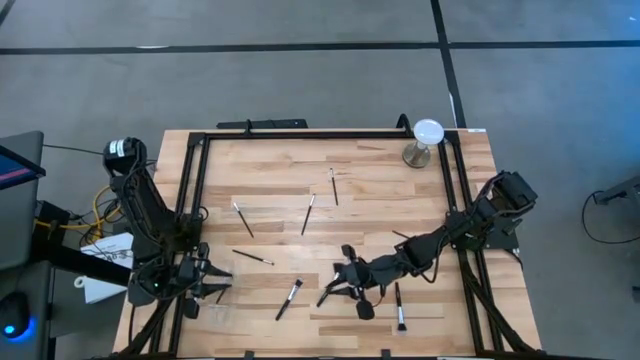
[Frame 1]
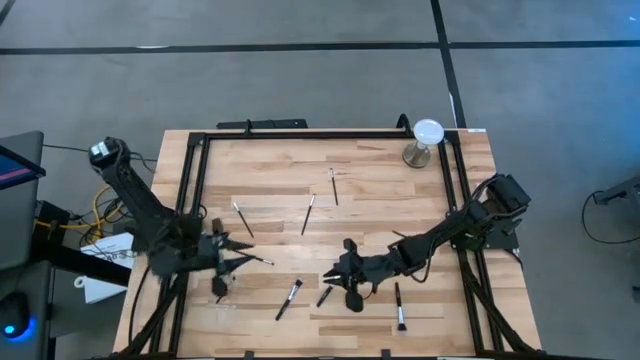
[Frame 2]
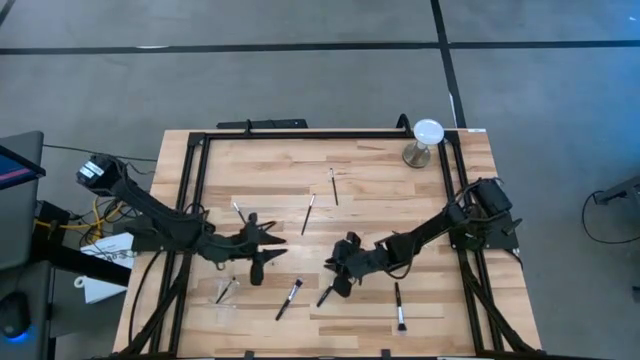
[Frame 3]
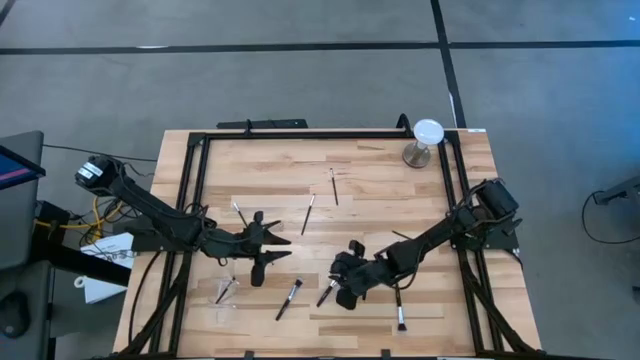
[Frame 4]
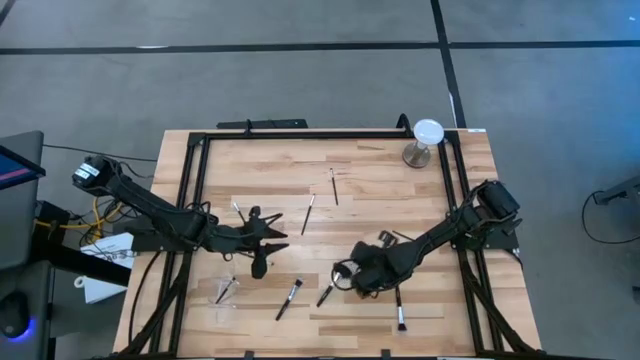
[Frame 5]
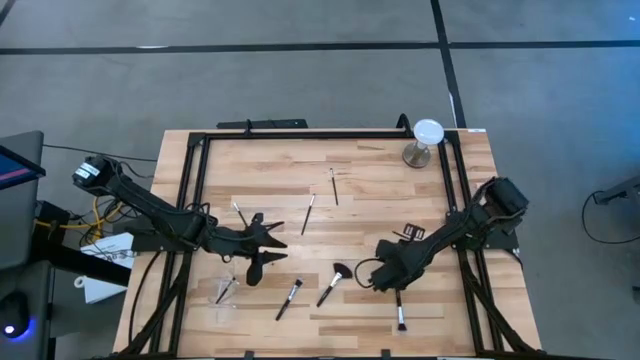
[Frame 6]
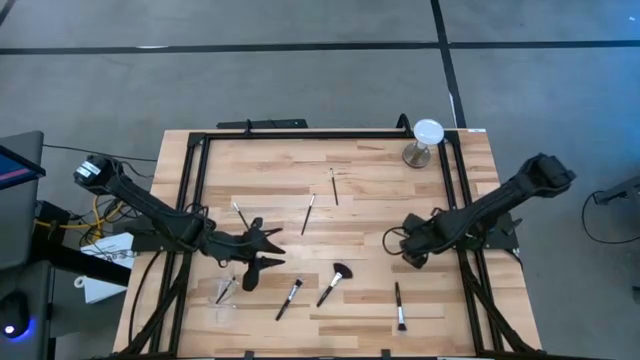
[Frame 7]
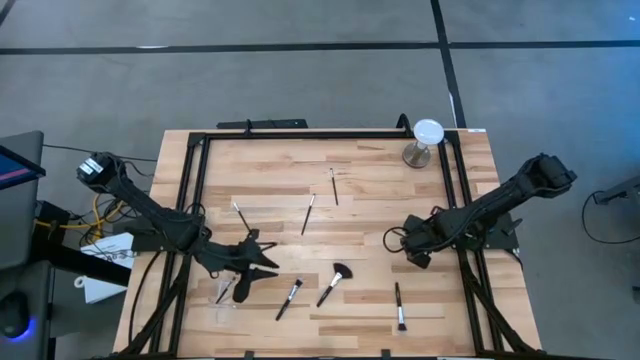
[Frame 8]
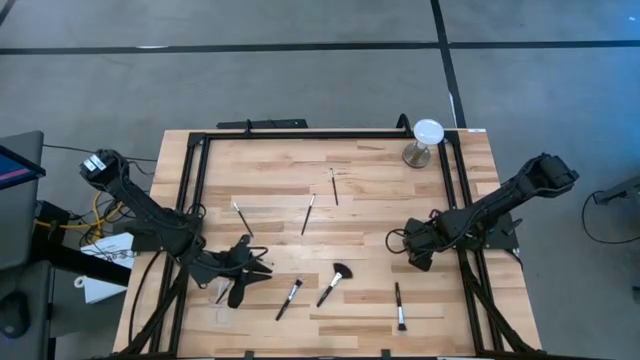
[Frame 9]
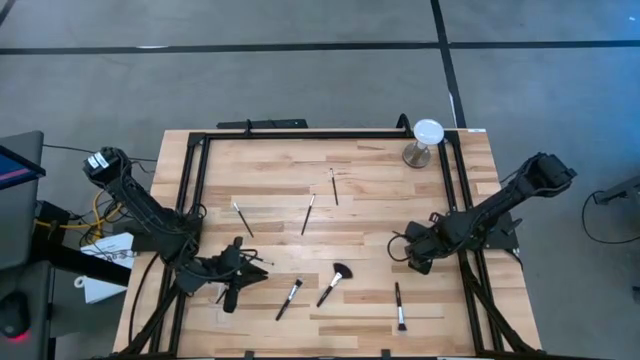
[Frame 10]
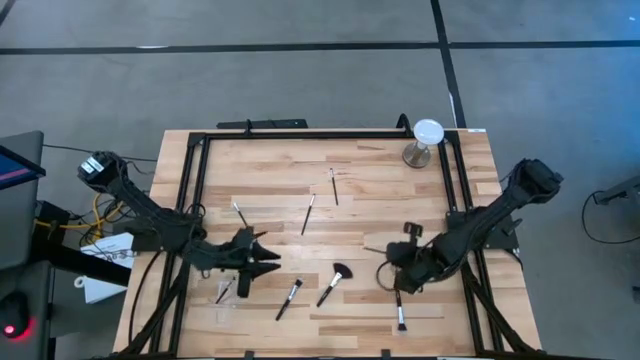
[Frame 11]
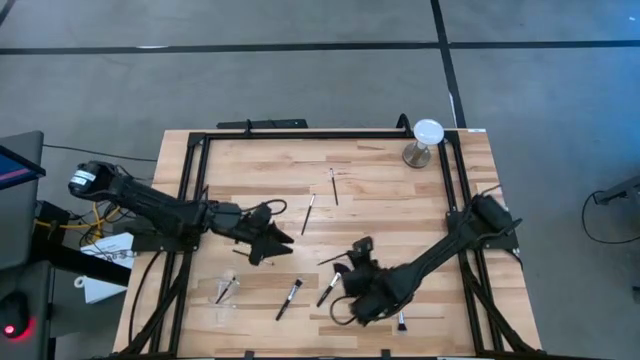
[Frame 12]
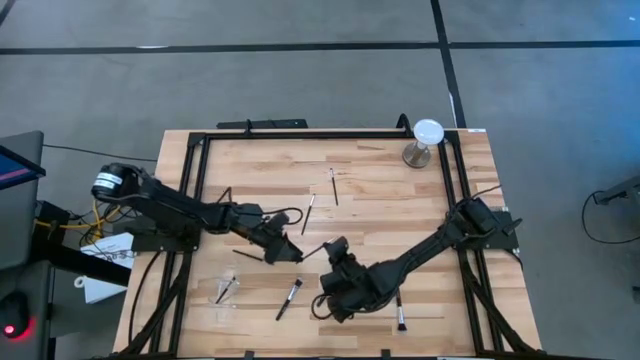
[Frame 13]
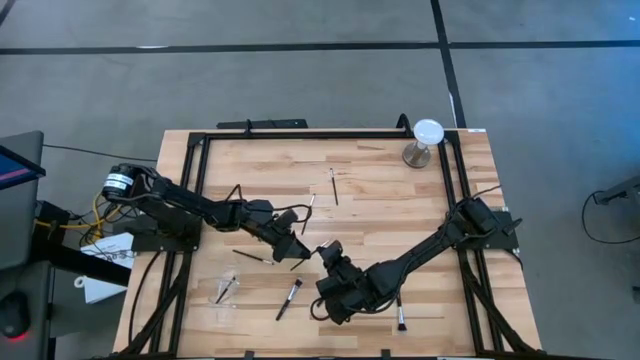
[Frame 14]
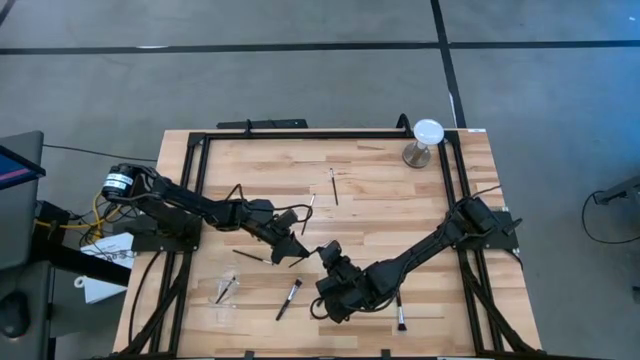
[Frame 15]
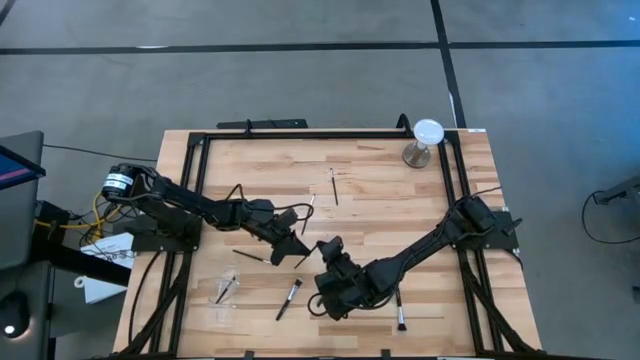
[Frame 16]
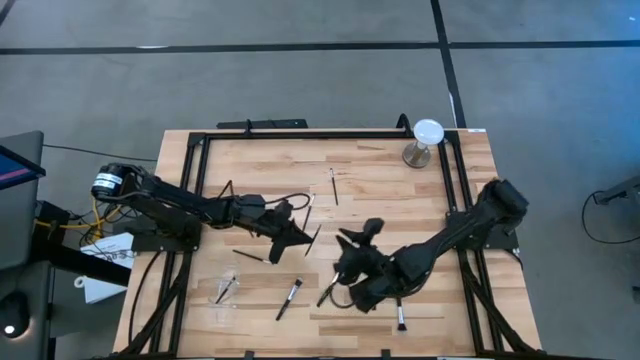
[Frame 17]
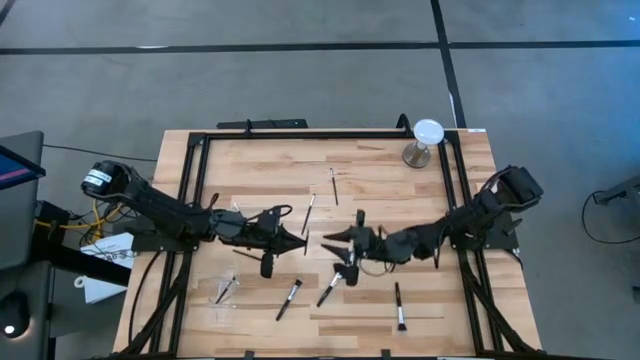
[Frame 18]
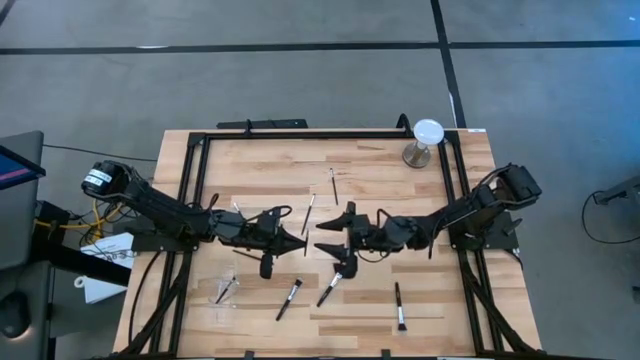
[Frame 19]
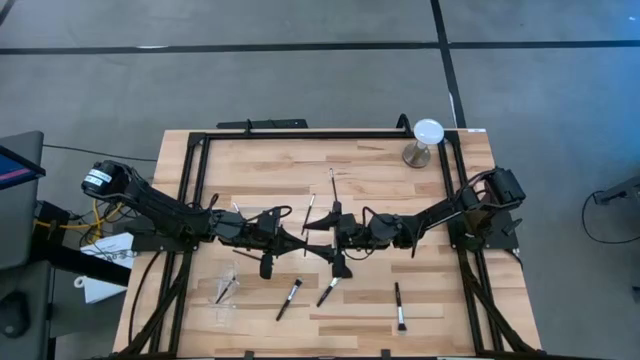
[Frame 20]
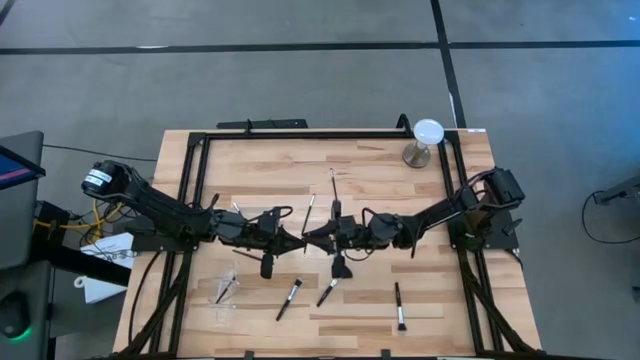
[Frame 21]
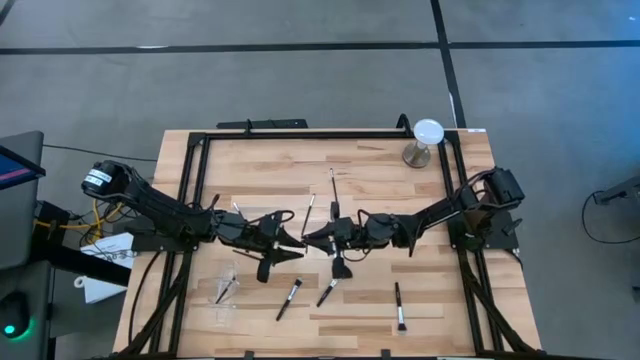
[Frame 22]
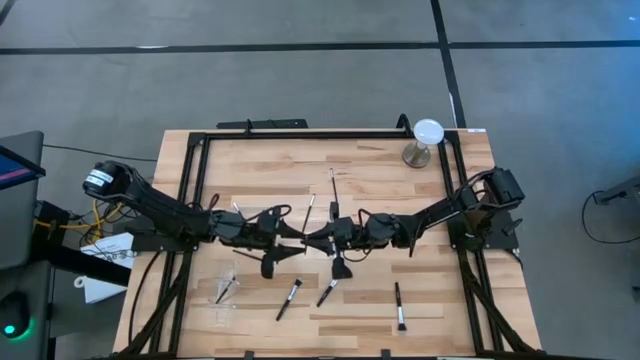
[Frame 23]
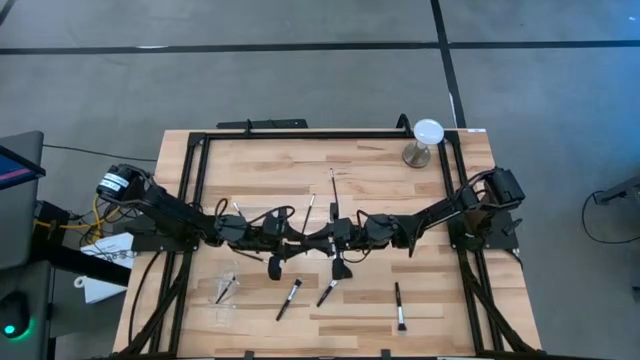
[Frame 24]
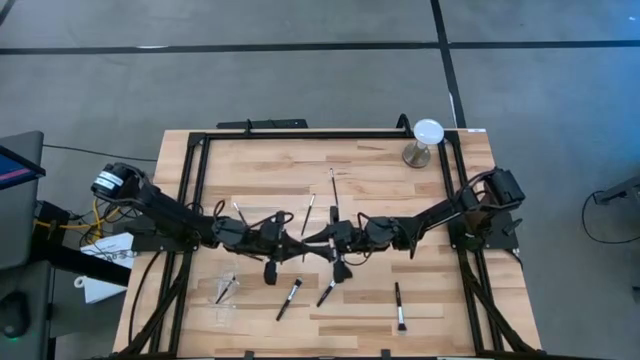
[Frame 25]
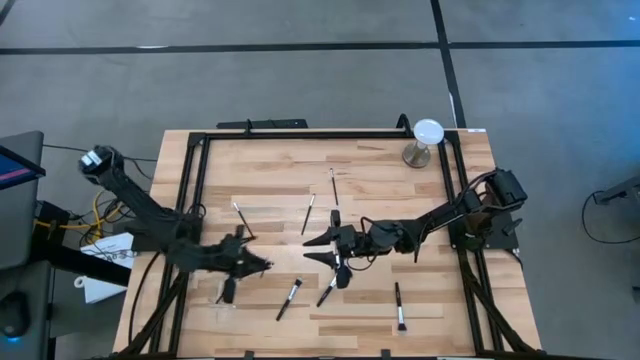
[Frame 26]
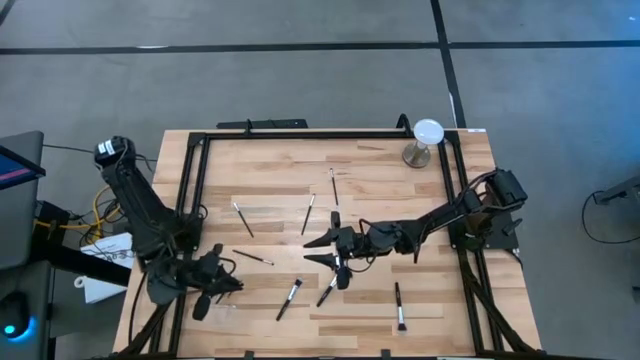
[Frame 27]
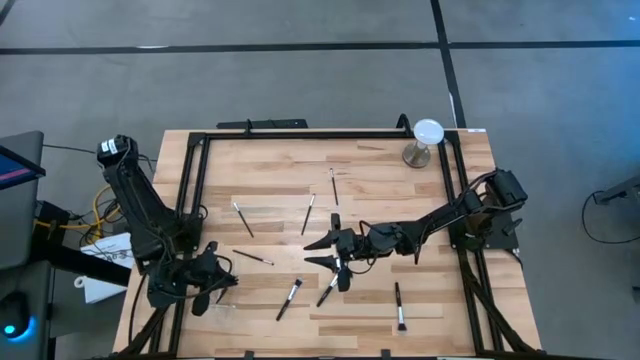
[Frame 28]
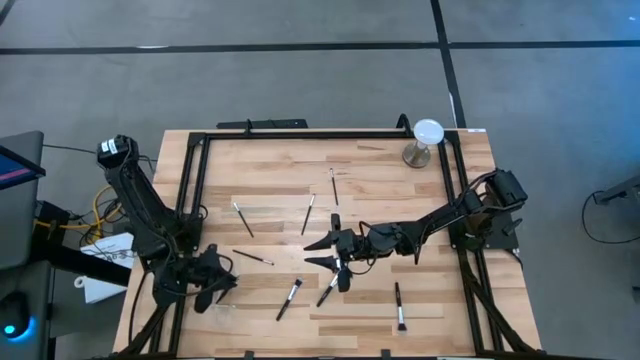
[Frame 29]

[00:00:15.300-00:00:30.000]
Task: Put items in baskets/containers
Put the liner brush into the transparent organizer

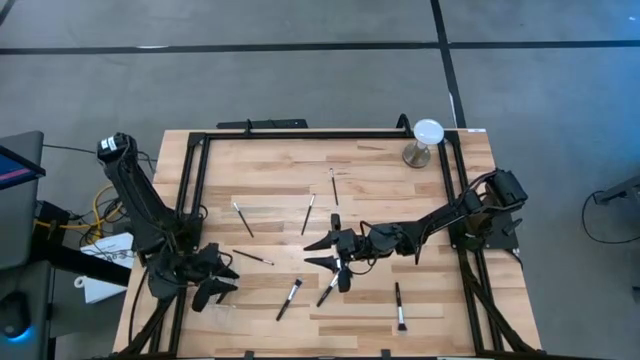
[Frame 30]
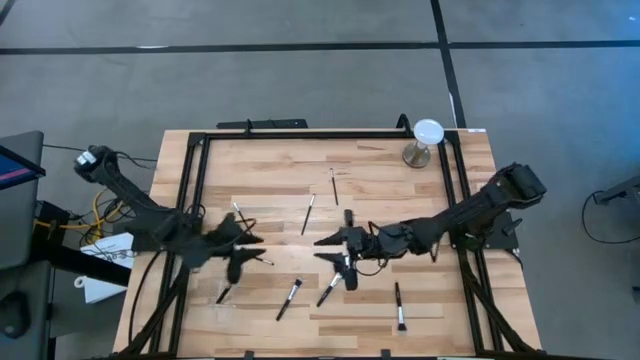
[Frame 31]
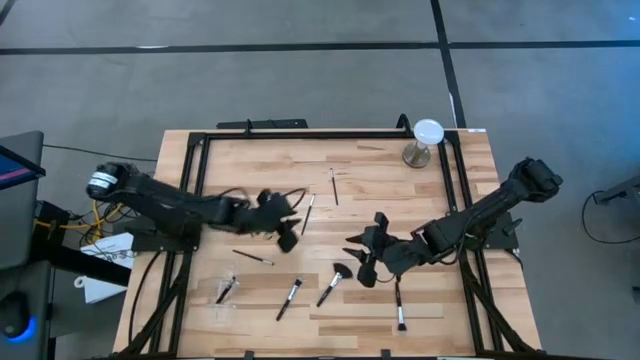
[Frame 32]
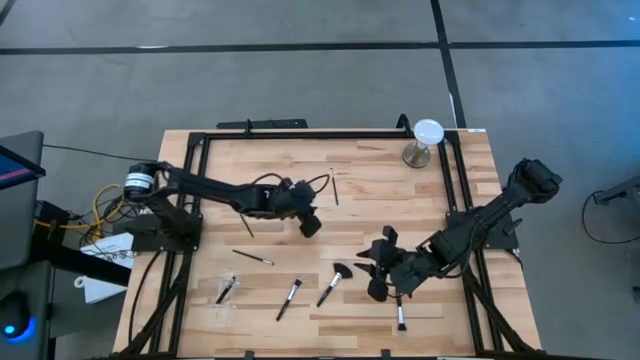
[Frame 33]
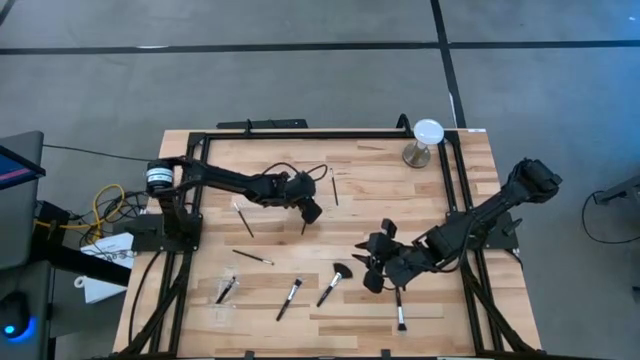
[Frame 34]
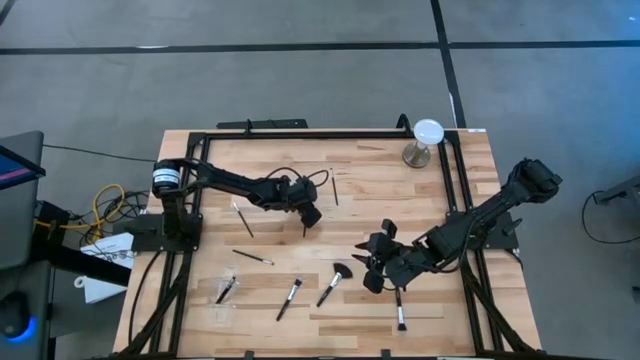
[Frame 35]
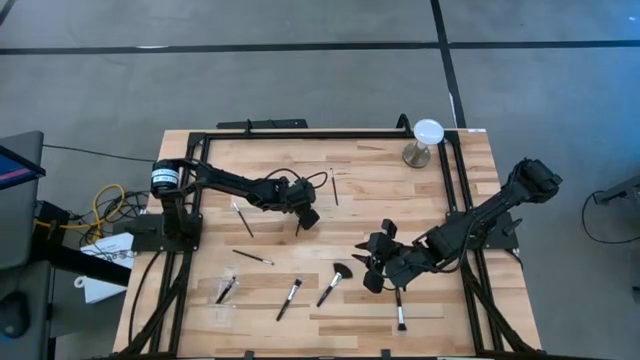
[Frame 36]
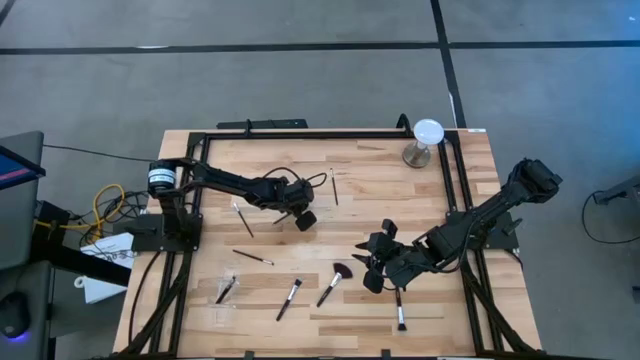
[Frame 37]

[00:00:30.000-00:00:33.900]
Put the eyeshadow brush into the transparent organizer

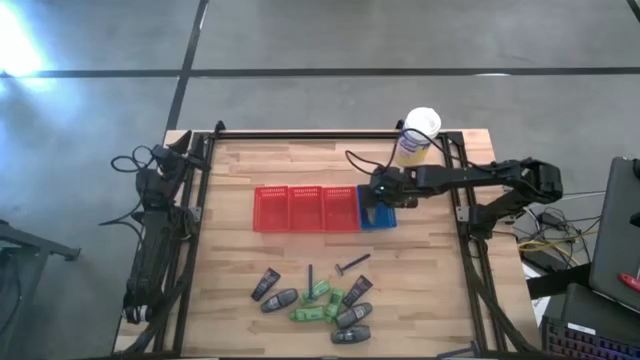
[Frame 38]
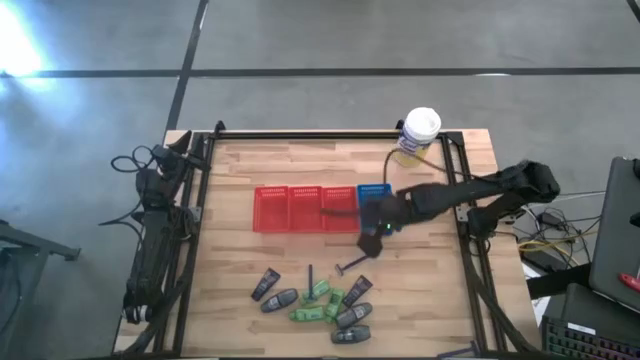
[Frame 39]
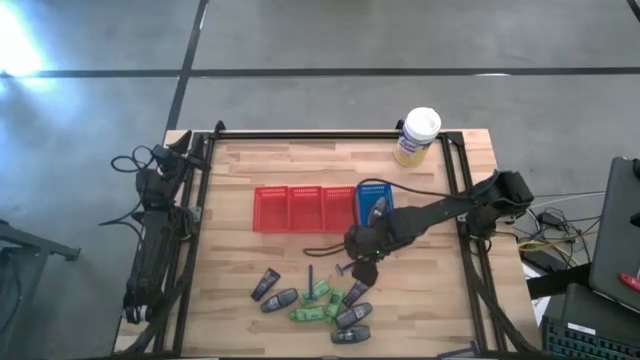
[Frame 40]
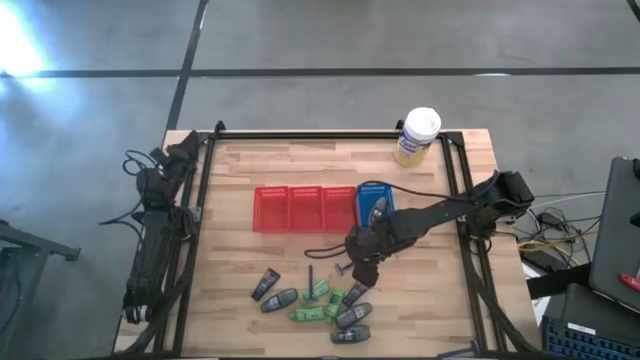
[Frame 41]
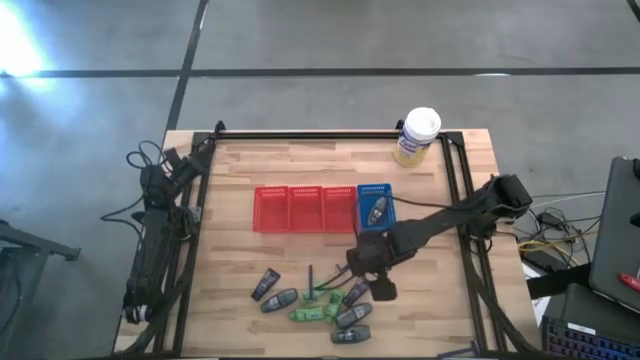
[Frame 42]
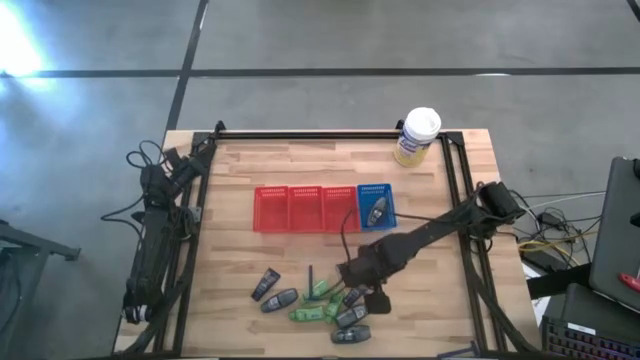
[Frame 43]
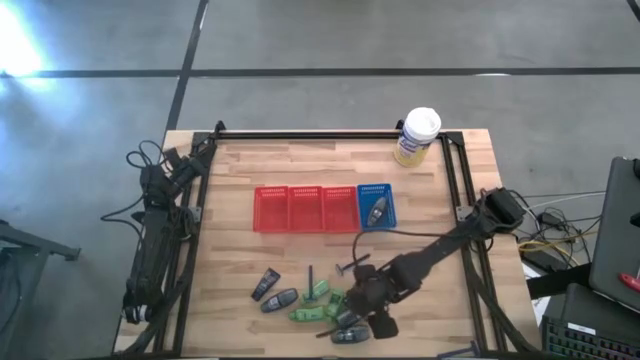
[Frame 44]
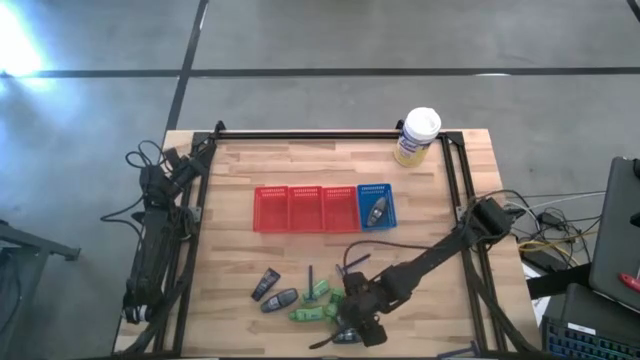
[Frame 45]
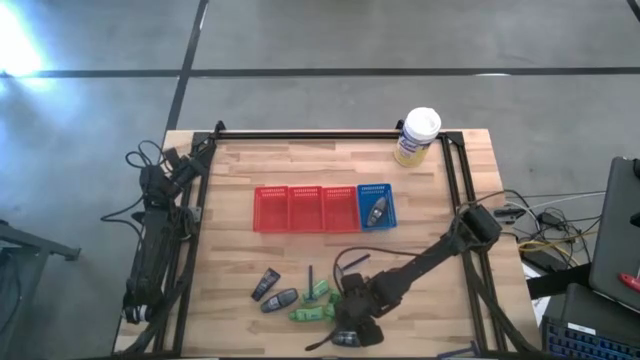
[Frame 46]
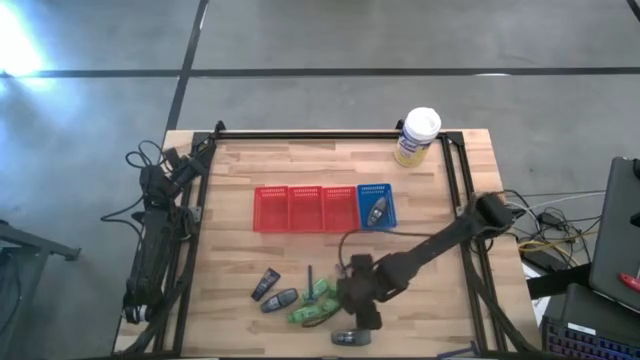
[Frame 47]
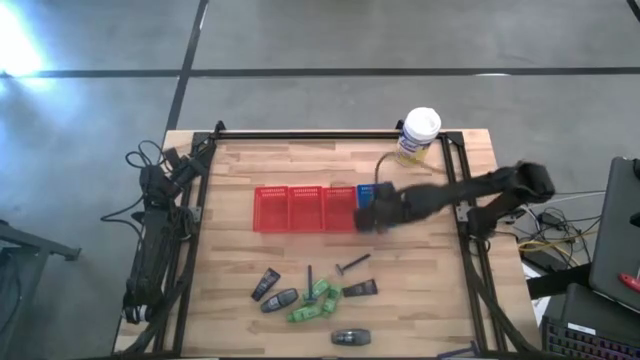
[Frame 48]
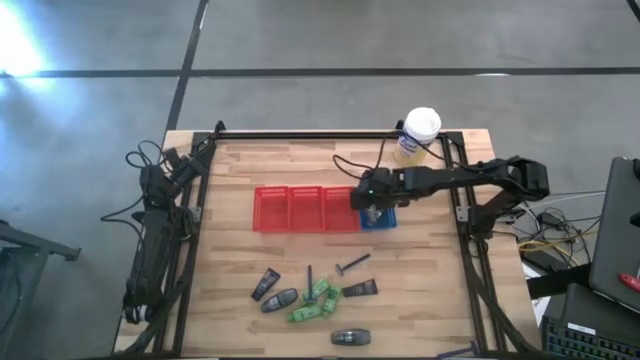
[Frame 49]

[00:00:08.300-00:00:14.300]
Task: Pick & Place Travel size toiletries
Put the black deodorant into the blue bin
